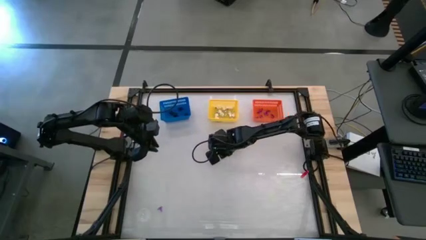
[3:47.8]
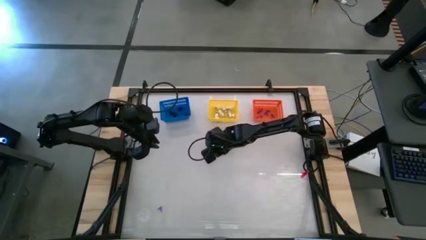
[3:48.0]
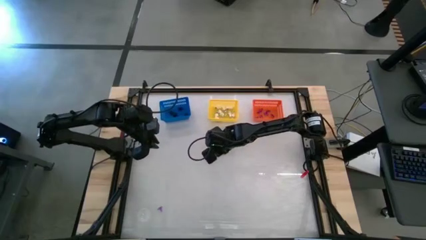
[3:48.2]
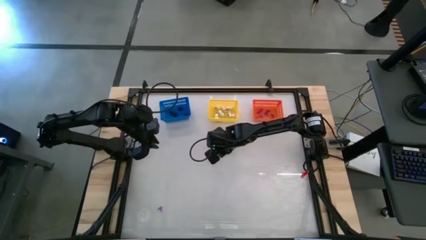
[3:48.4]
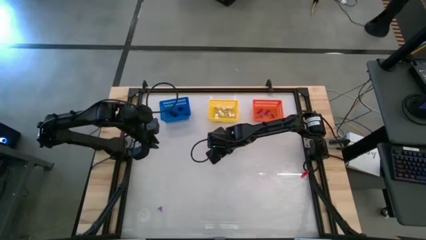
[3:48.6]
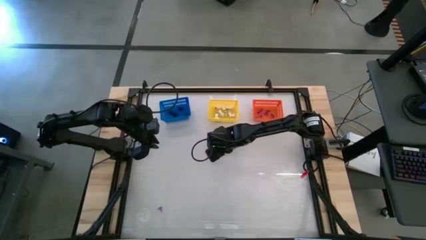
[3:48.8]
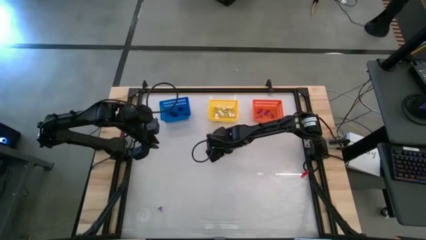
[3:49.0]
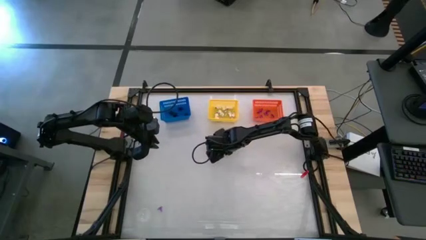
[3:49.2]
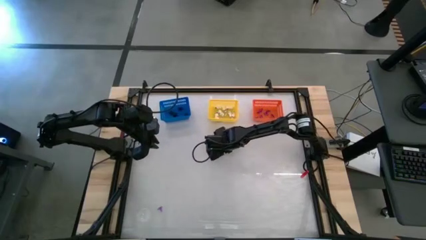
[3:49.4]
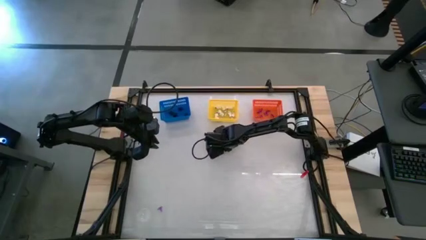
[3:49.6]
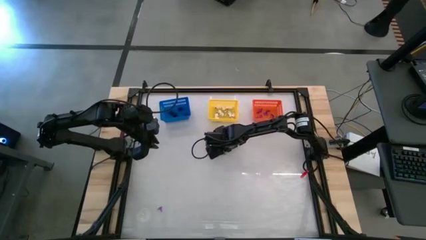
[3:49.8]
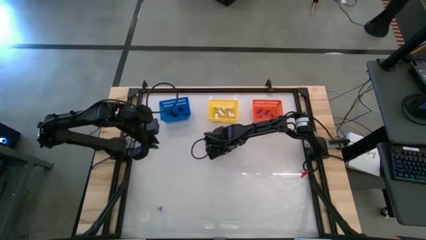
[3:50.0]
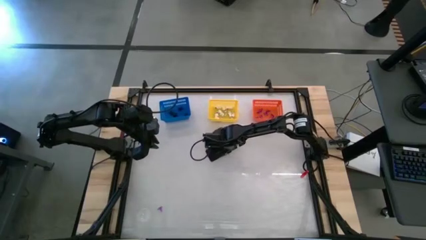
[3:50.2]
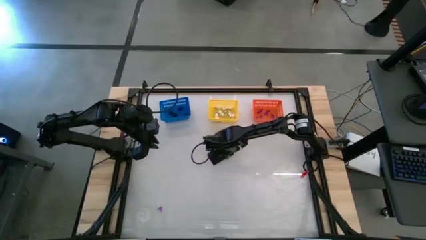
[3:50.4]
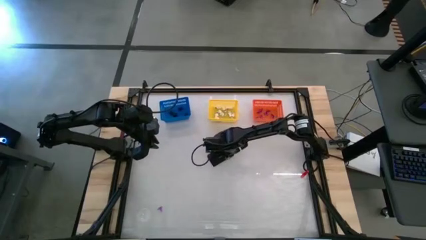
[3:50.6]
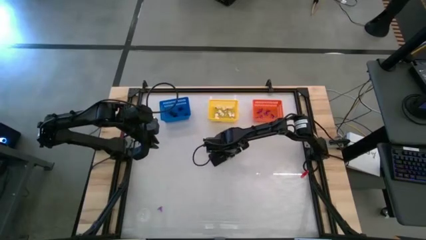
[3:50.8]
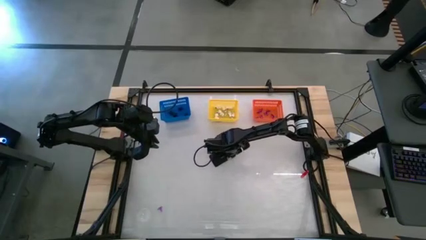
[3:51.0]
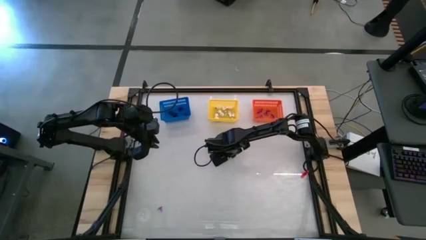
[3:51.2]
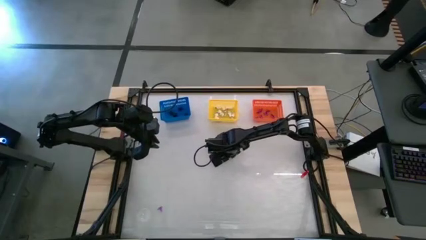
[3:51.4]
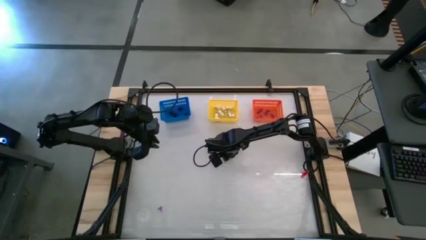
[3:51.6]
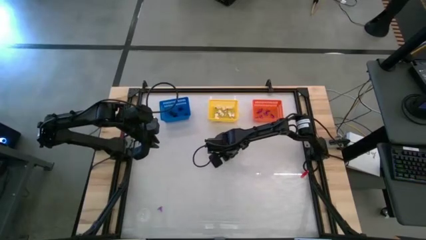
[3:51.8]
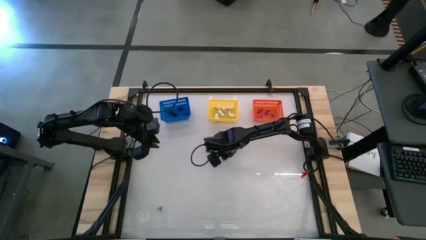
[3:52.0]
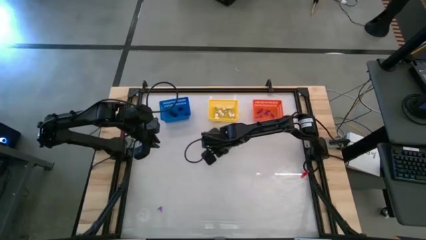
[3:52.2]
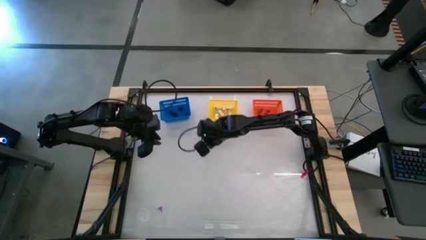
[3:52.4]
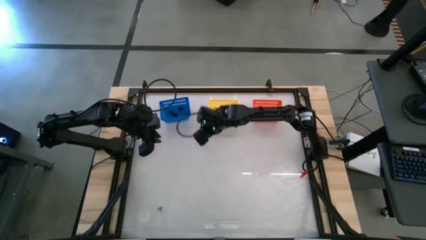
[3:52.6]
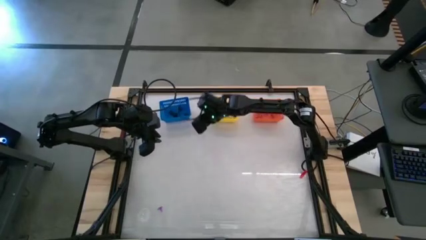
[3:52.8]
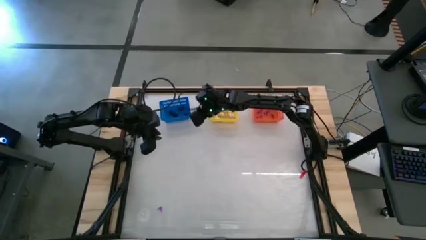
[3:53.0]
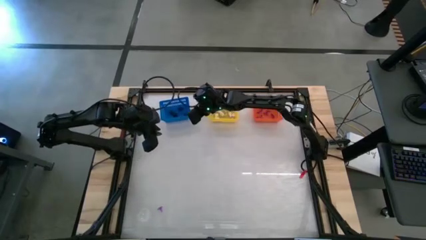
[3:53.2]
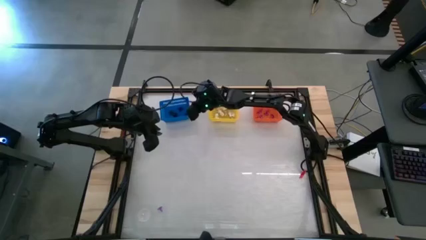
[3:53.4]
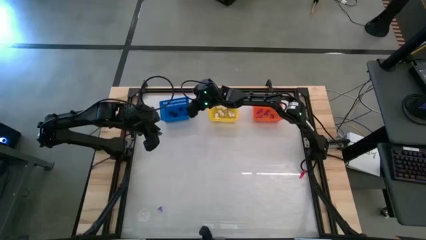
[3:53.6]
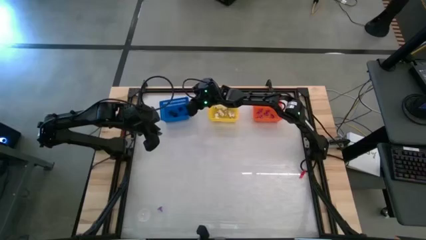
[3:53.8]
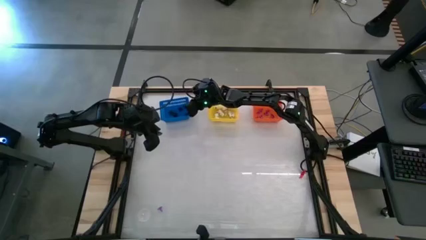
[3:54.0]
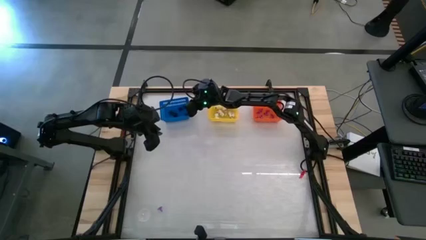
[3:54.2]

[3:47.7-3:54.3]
Task: Sort Halloween decoration
Put the black spider toy into the blue basket

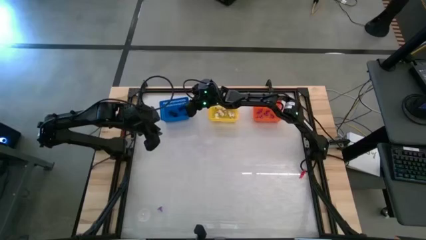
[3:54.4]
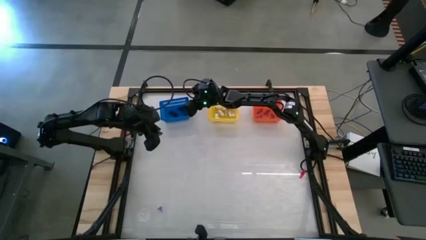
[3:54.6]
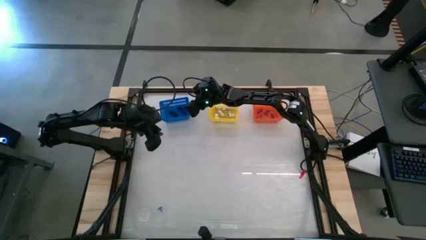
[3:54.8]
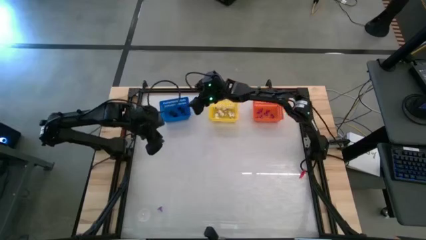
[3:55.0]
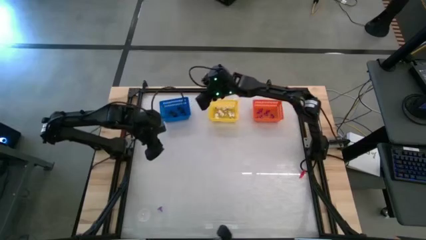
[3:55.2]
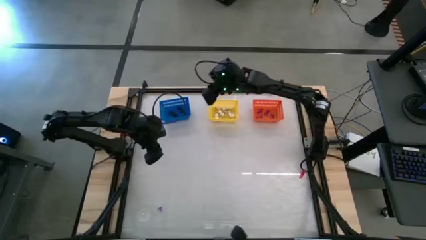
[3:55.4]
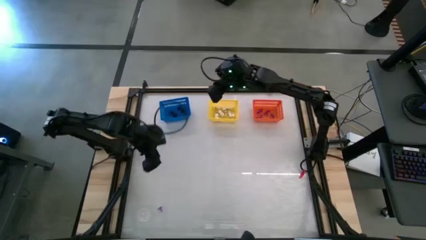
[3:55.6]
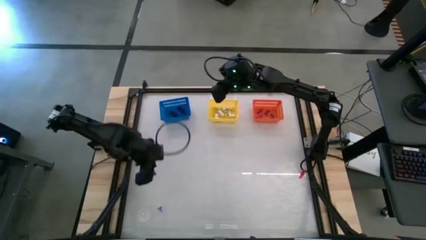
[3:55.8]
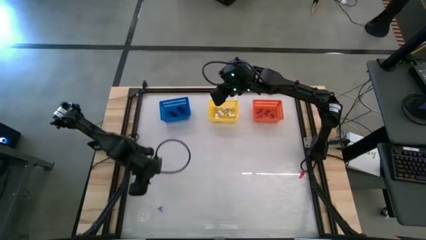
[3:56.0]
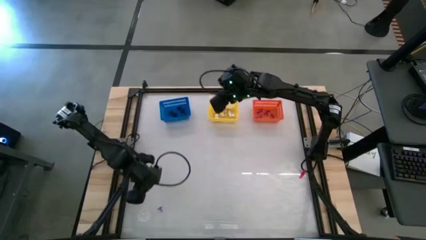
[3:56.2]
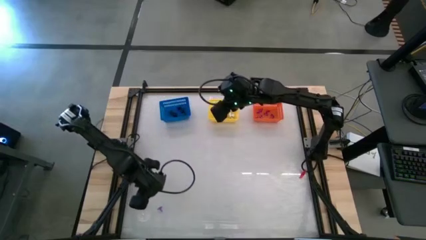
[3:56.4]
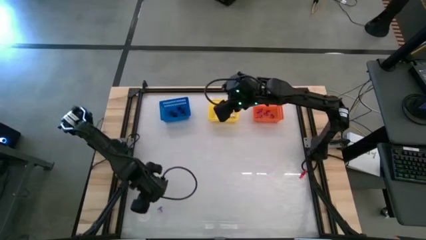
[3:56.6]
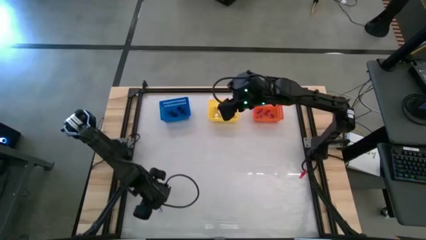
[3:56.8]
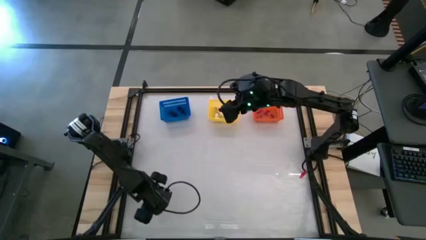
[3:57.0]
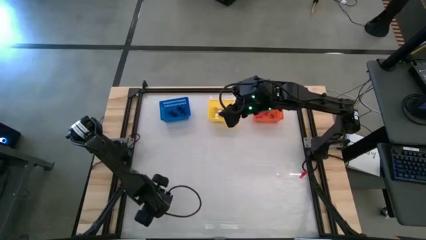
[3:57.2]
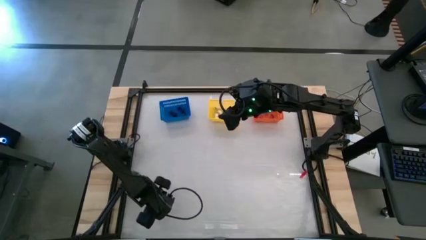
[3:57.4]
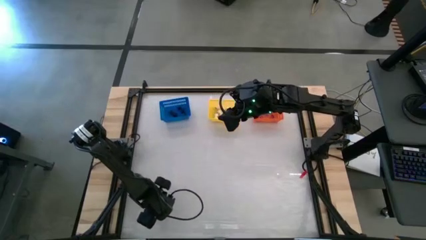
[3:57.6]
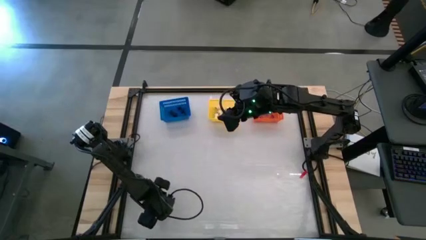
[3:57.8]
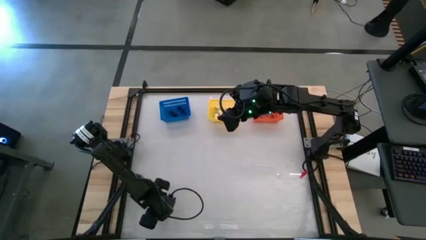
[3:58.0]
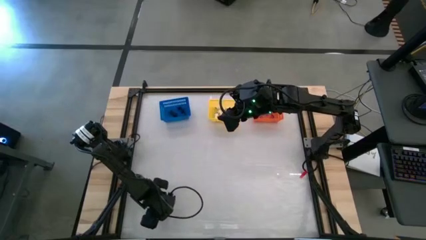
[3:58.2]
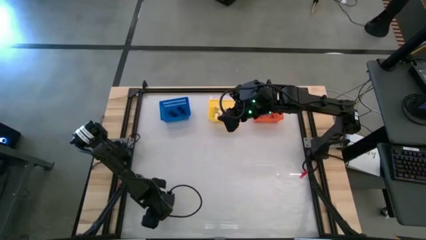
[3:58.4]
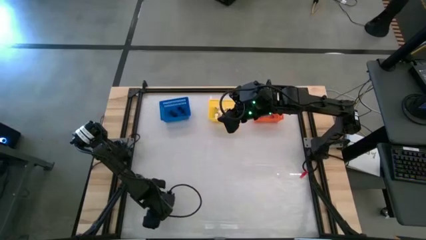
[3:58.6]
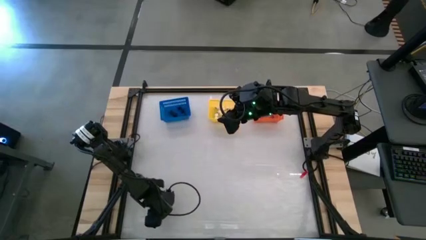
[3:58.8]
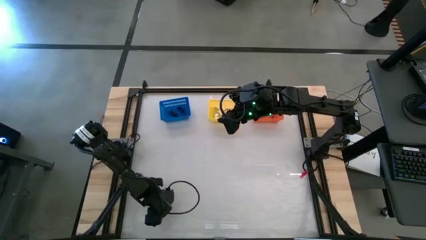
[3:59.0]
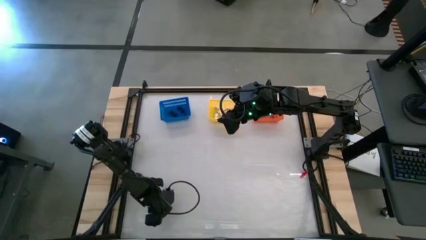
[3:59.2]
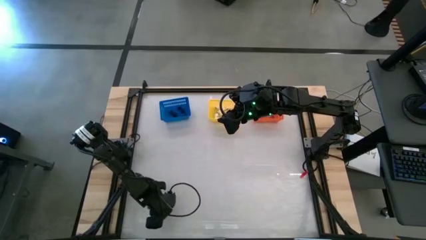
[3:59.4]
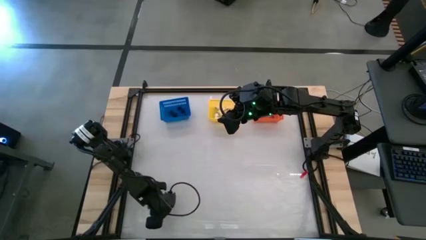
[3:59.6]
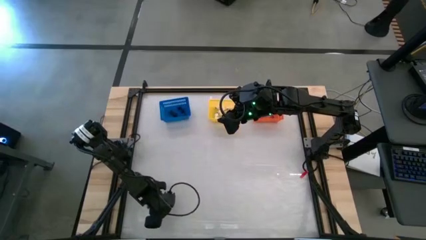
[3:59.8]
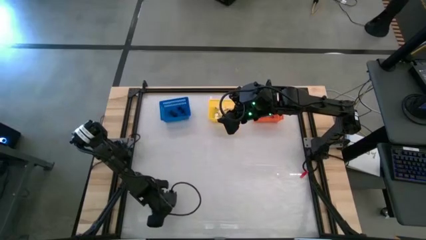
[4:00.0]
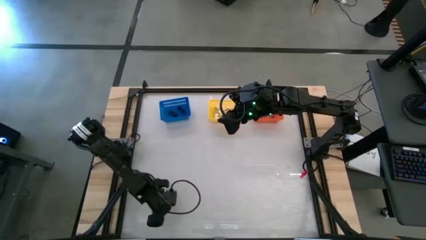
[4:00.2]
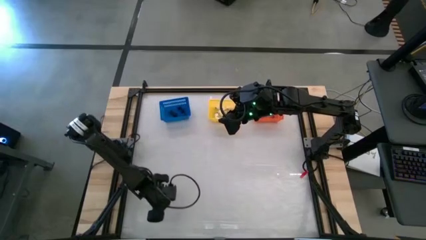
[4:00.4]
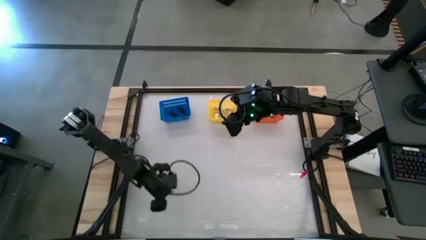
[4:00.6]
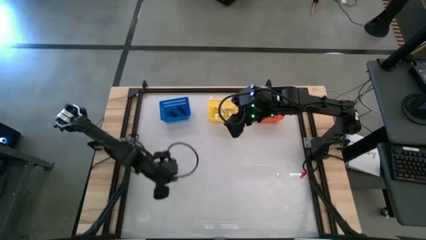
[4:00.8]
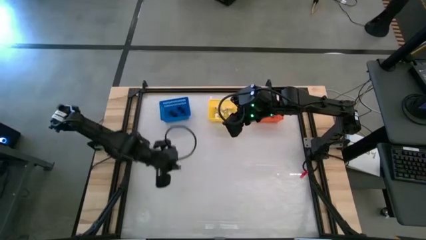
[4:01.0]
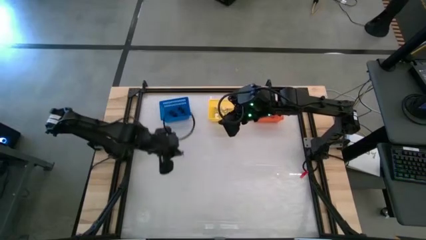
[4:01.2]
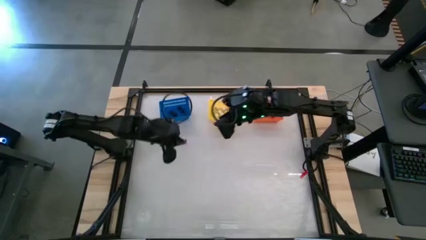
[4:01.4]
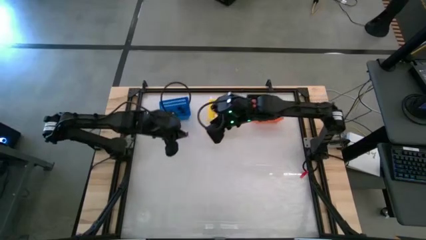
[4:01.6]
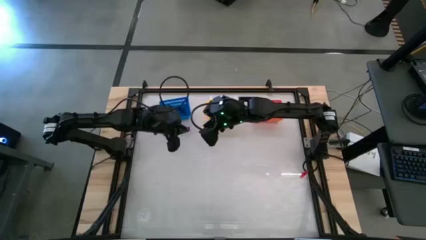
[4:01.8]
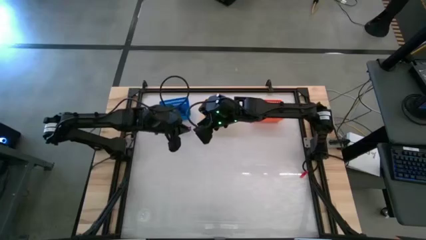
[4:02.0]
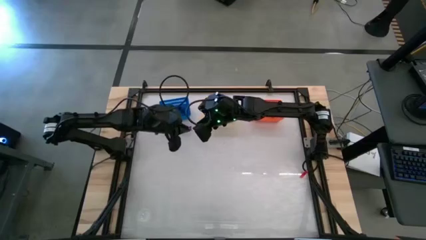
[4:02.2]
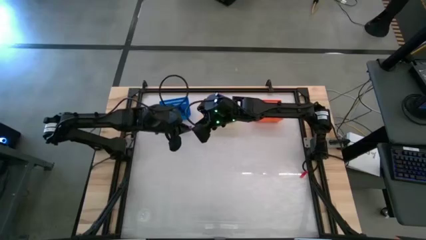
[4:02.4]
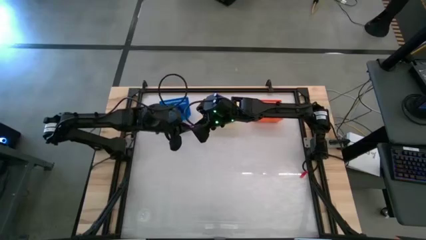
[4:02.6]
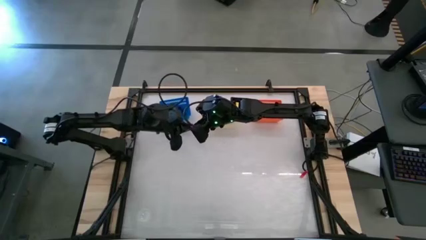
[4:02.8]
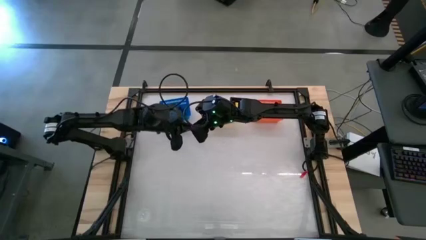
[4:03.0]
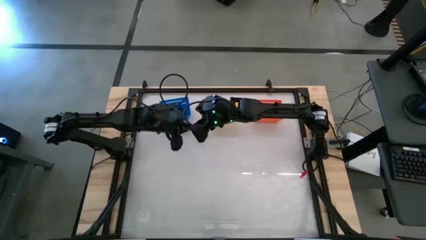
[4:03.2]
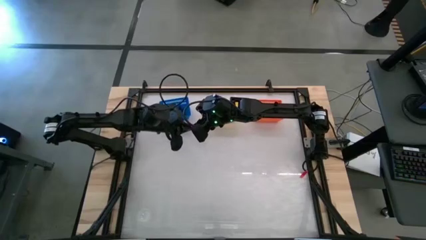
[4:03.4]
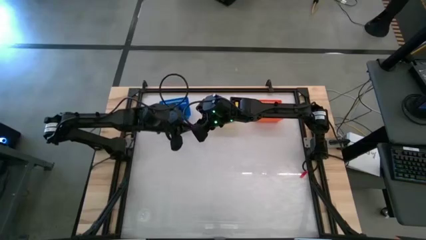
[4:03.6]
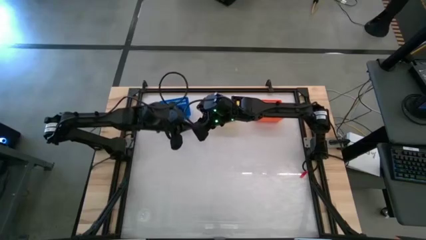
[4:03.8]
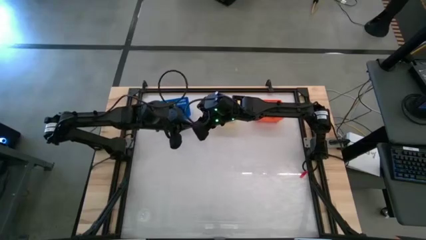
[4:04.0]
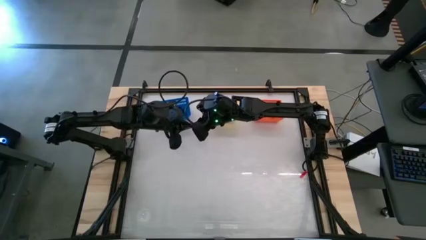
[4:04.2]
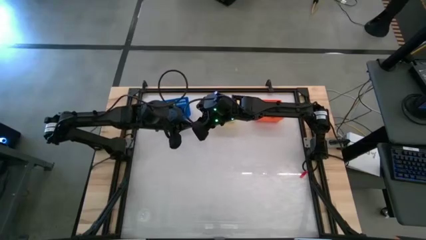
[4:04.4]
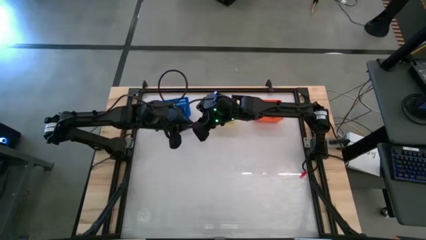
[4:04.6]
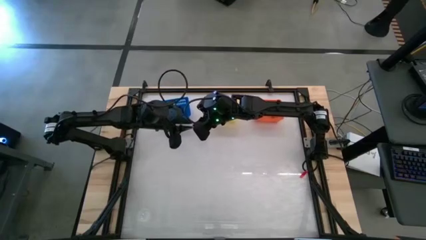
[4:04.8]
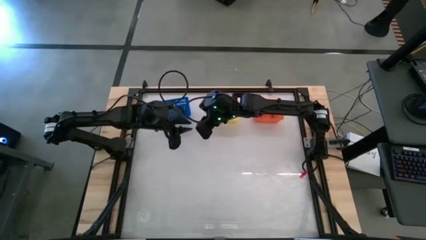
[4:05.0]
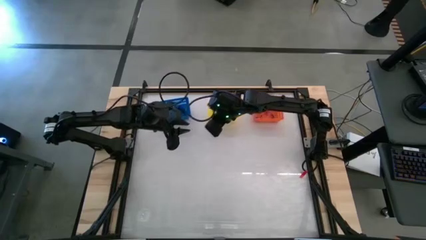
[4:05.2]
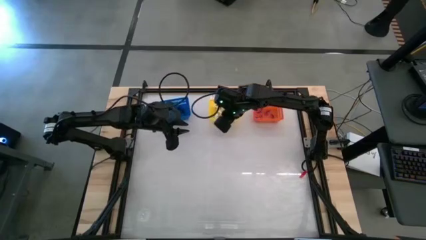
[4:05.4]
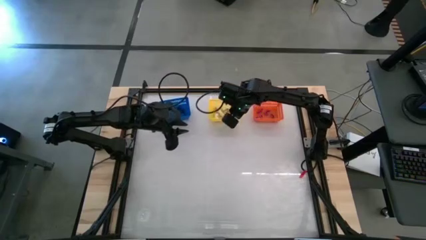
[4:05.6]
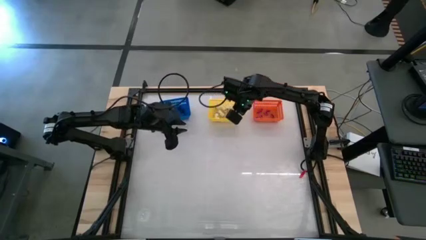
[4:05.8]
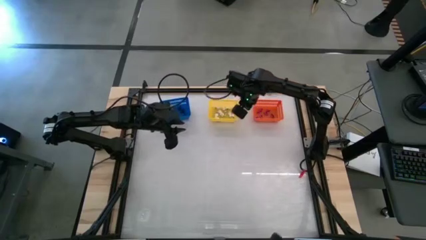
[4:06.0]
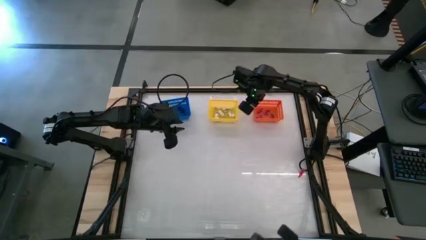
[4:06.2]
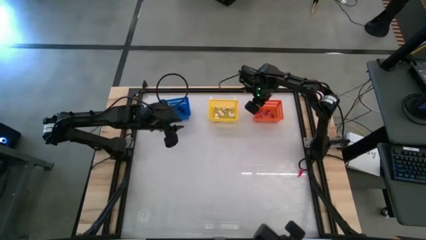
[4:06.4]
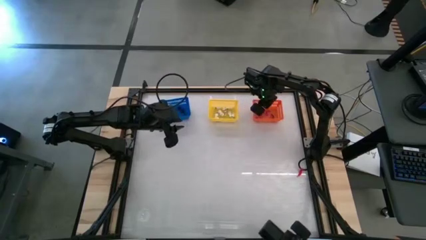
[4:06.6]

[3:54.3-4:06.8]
Put the purple witch hat toy into the orange basket
